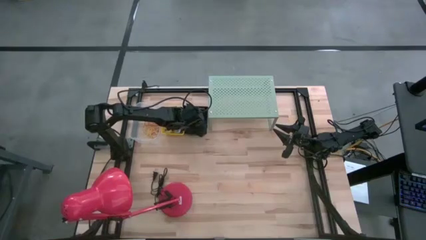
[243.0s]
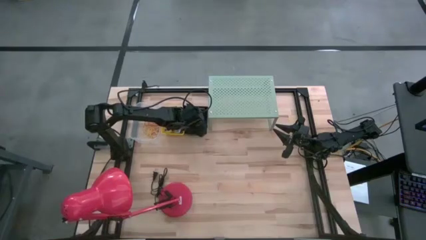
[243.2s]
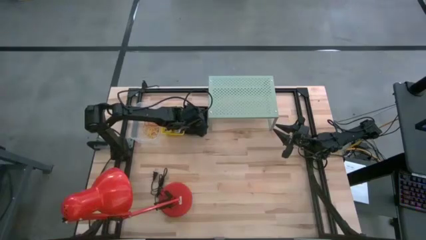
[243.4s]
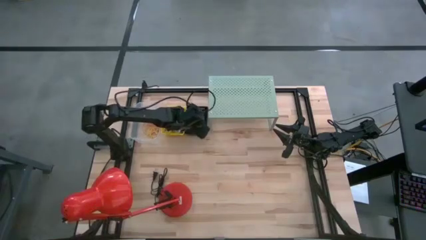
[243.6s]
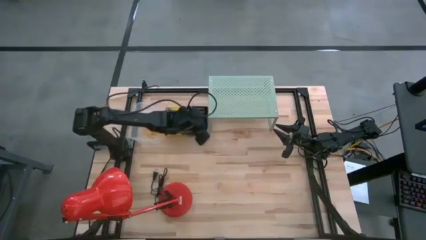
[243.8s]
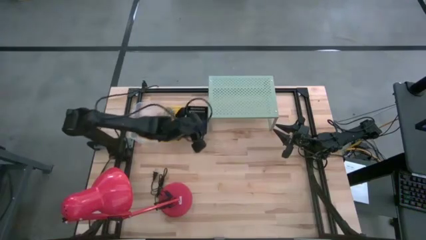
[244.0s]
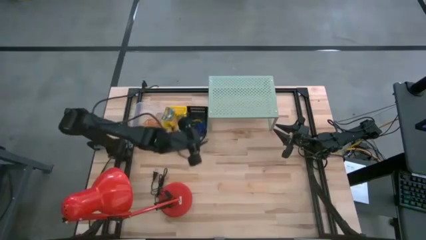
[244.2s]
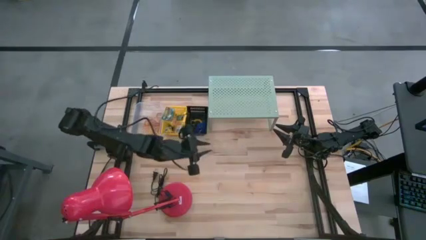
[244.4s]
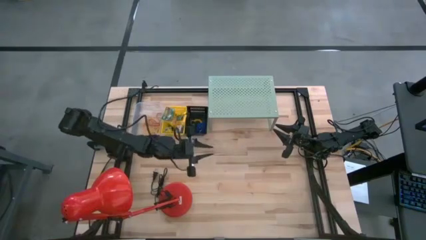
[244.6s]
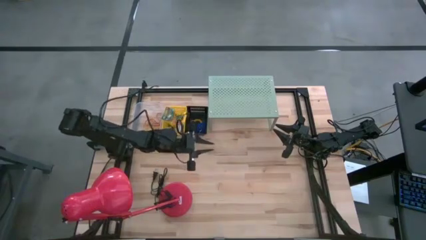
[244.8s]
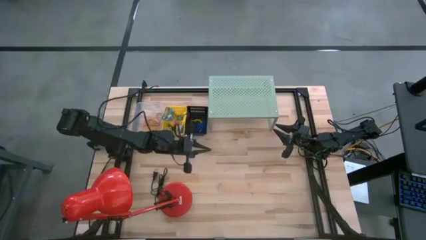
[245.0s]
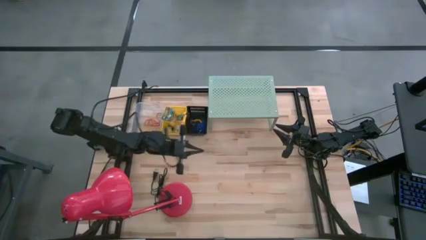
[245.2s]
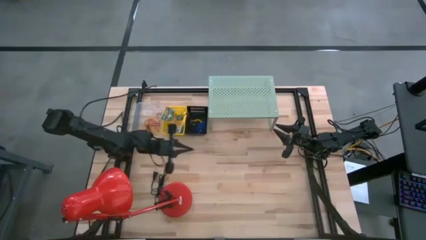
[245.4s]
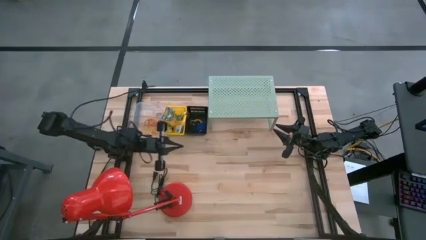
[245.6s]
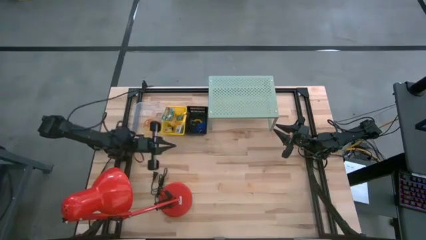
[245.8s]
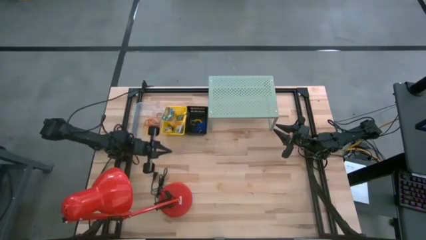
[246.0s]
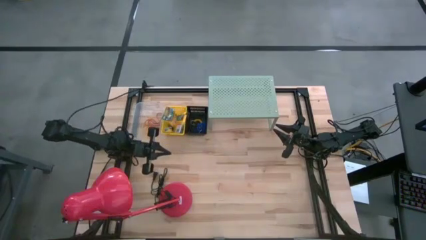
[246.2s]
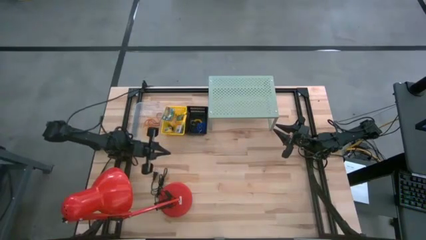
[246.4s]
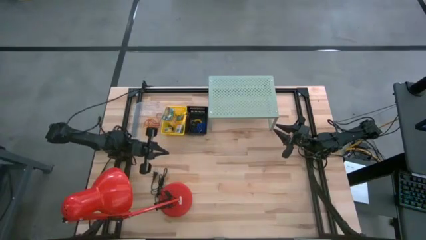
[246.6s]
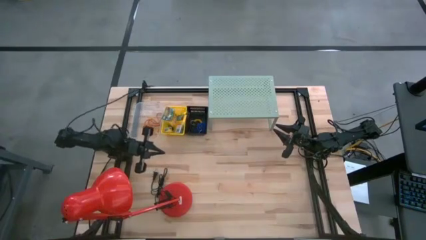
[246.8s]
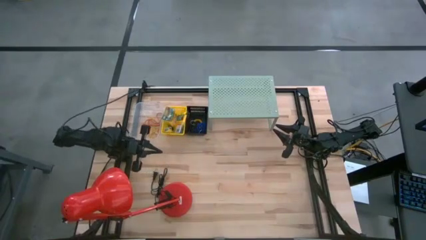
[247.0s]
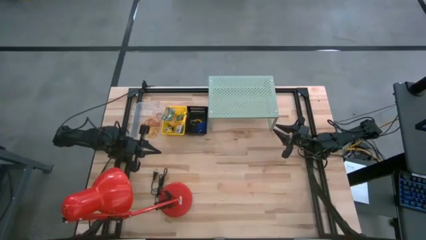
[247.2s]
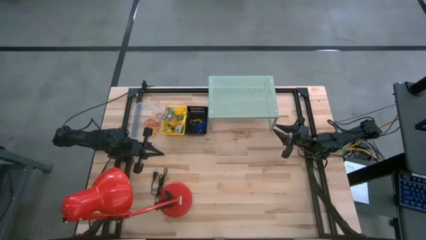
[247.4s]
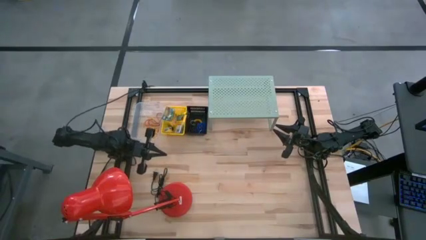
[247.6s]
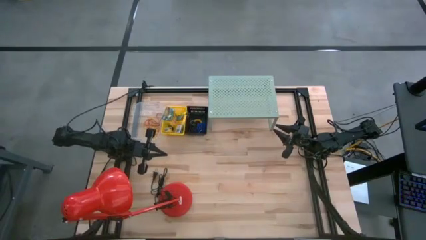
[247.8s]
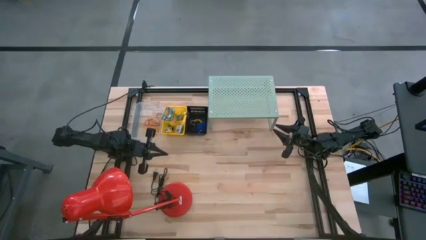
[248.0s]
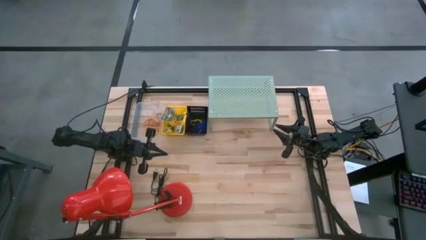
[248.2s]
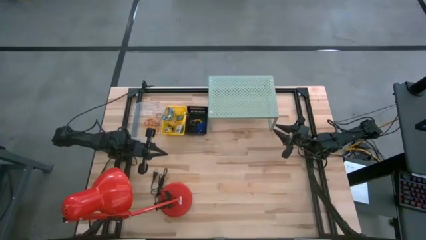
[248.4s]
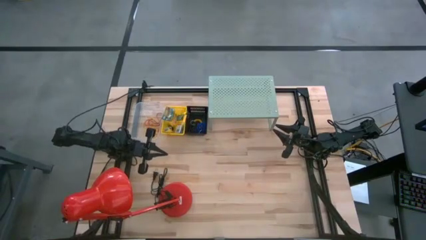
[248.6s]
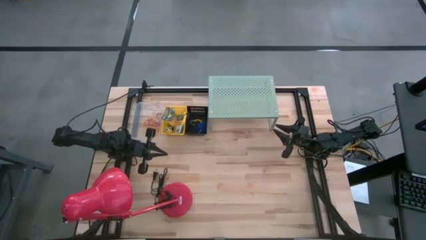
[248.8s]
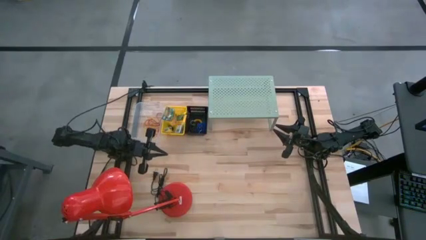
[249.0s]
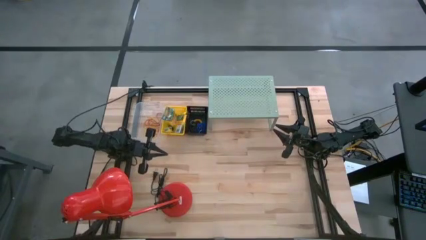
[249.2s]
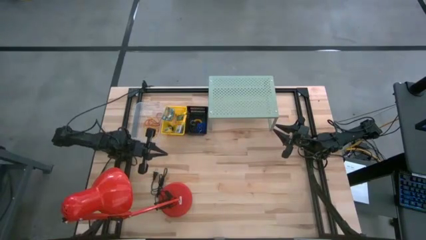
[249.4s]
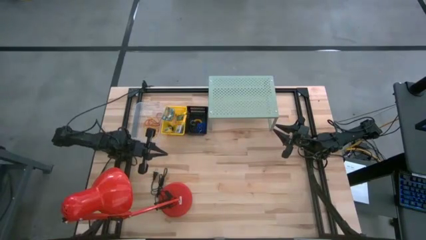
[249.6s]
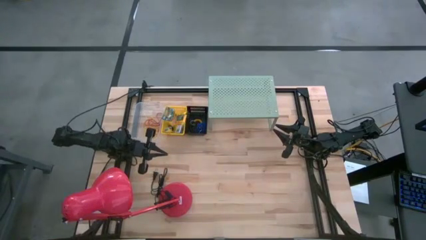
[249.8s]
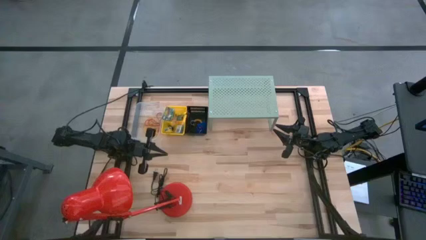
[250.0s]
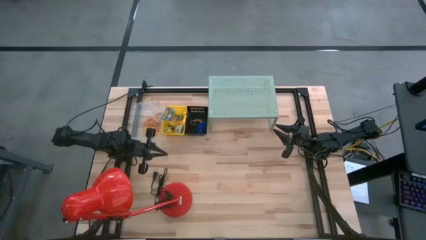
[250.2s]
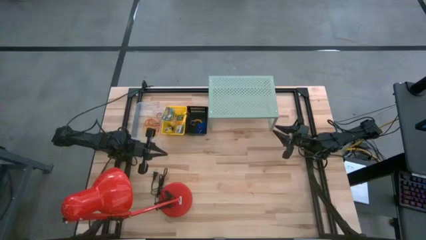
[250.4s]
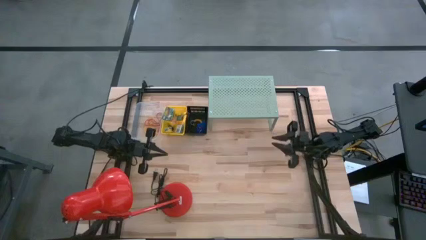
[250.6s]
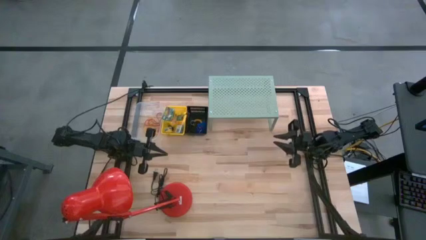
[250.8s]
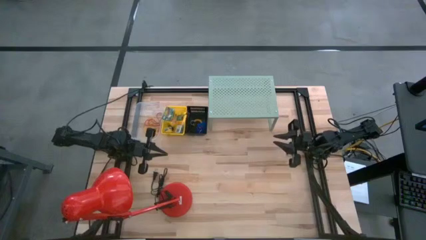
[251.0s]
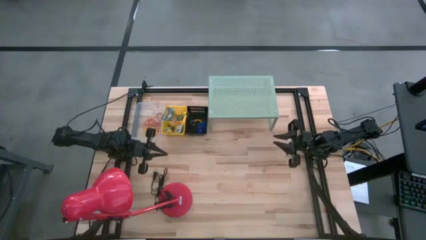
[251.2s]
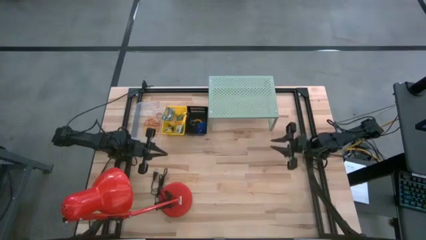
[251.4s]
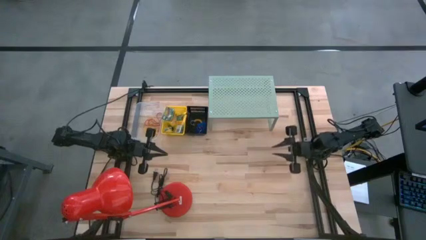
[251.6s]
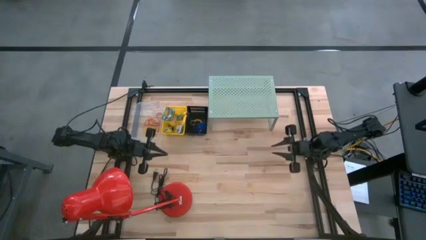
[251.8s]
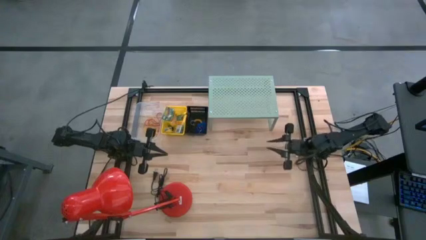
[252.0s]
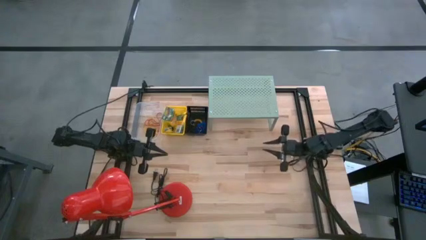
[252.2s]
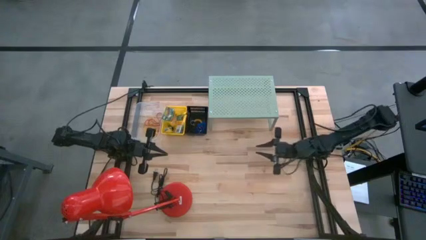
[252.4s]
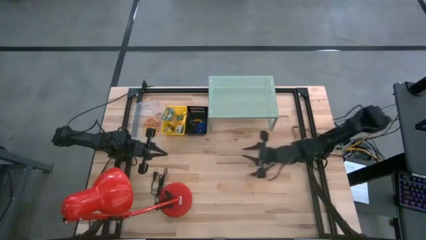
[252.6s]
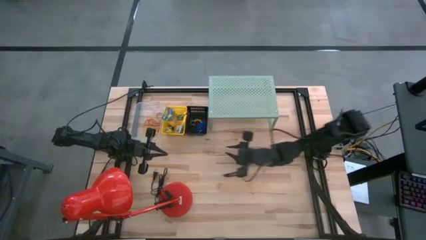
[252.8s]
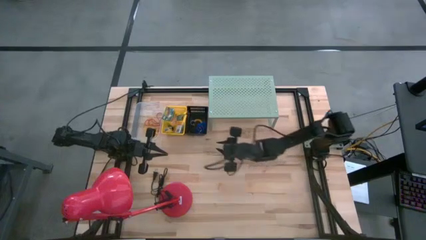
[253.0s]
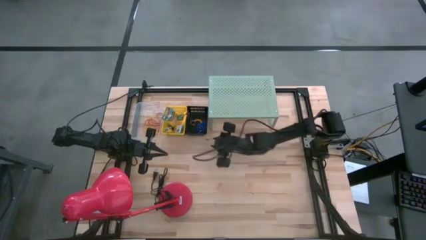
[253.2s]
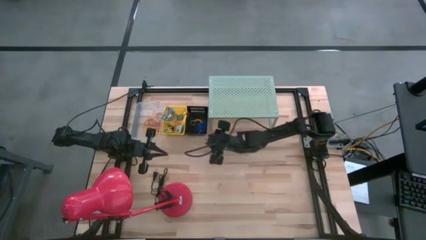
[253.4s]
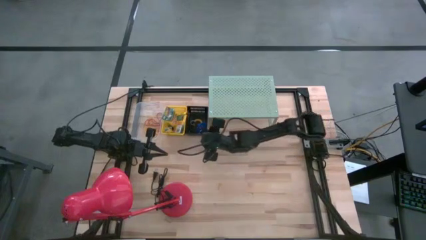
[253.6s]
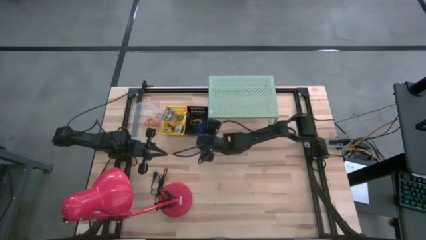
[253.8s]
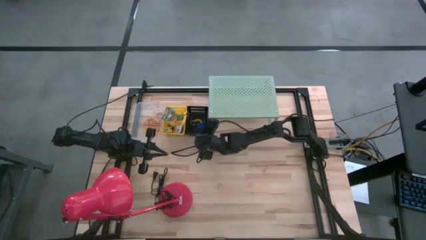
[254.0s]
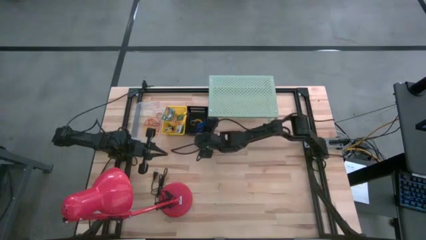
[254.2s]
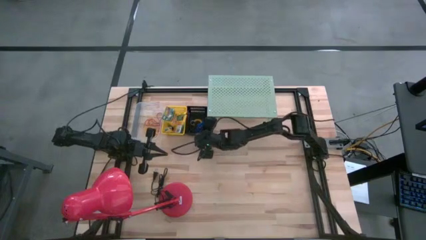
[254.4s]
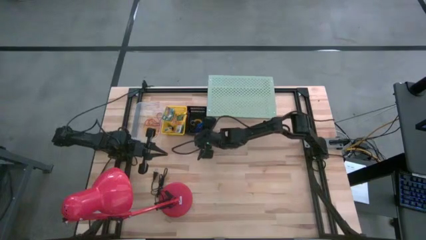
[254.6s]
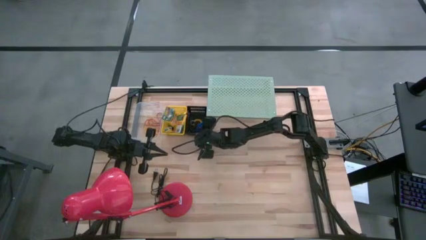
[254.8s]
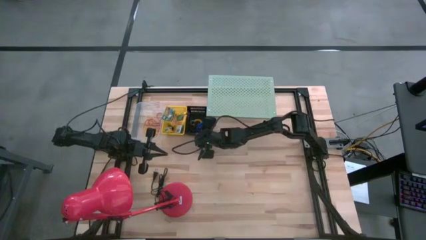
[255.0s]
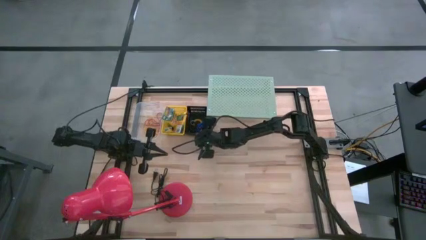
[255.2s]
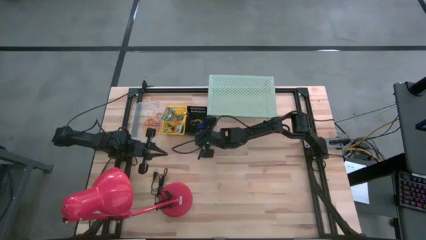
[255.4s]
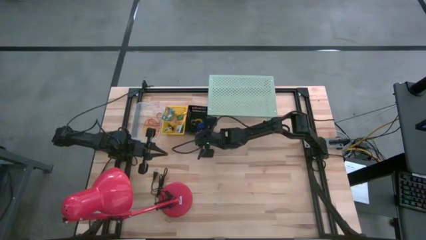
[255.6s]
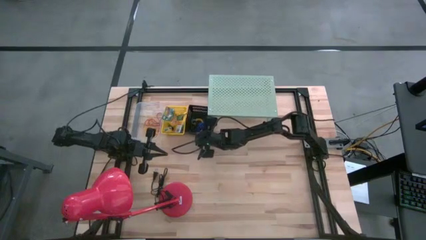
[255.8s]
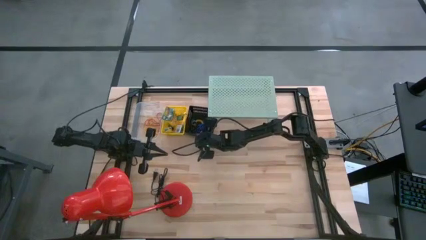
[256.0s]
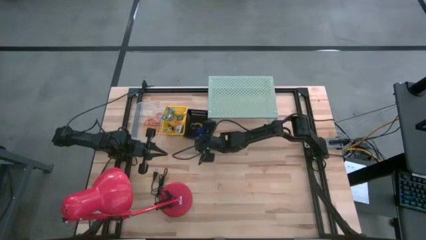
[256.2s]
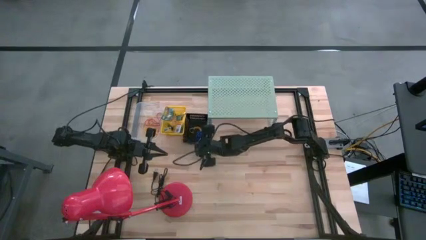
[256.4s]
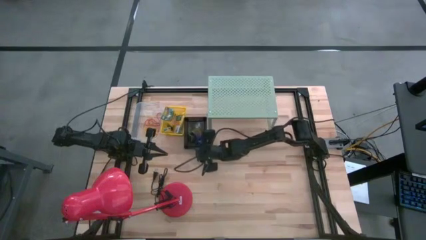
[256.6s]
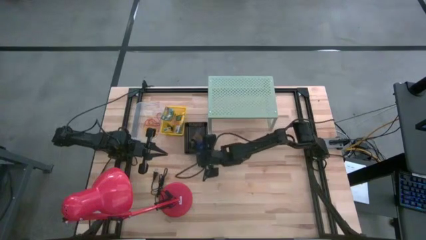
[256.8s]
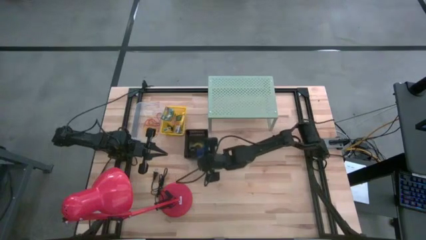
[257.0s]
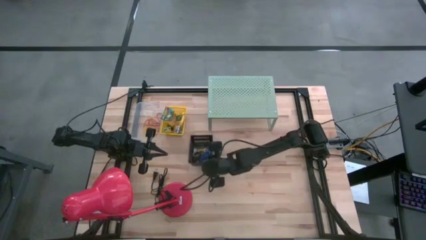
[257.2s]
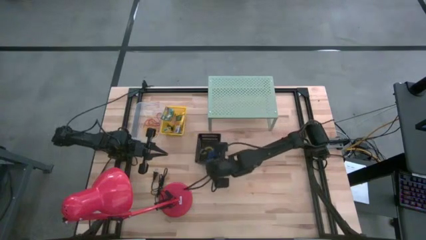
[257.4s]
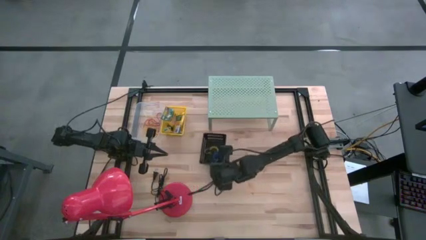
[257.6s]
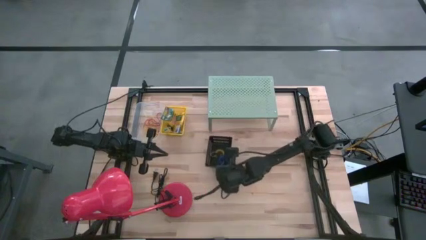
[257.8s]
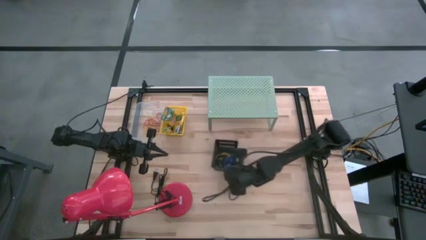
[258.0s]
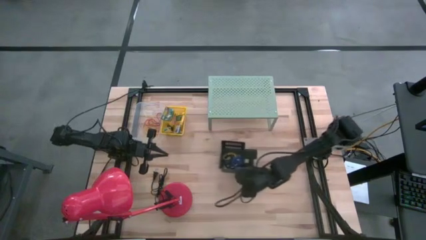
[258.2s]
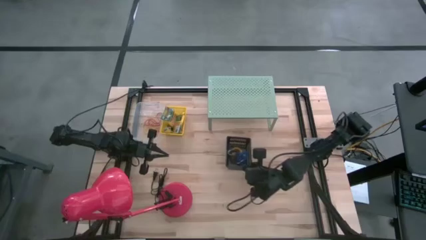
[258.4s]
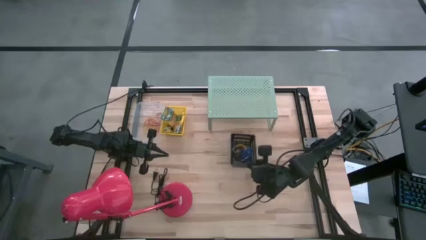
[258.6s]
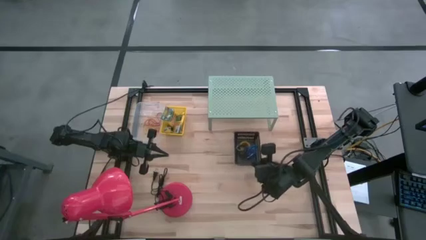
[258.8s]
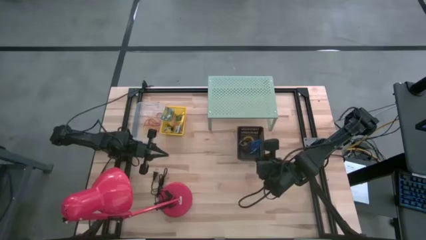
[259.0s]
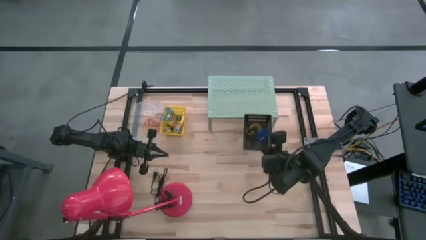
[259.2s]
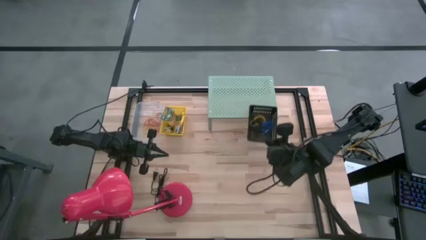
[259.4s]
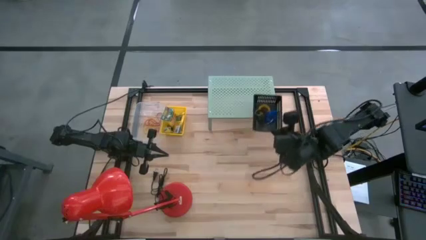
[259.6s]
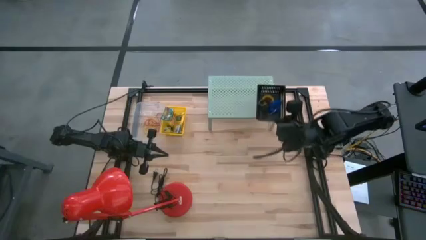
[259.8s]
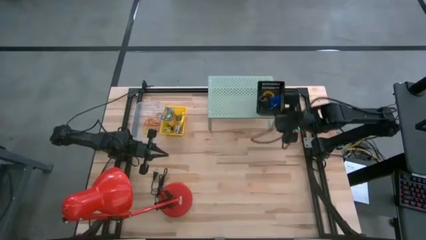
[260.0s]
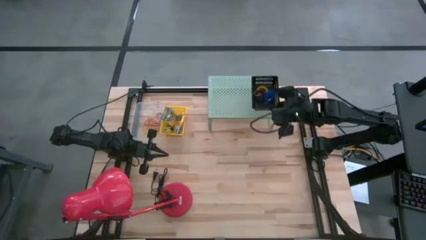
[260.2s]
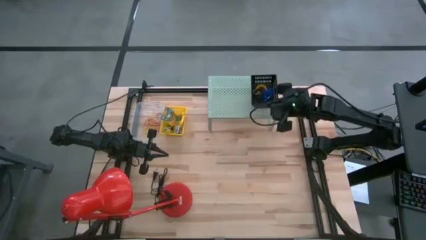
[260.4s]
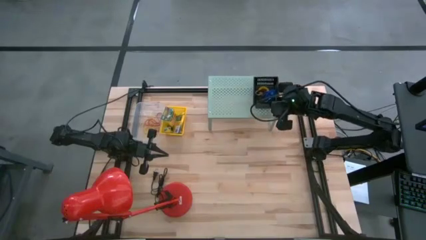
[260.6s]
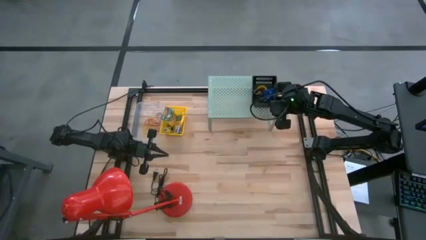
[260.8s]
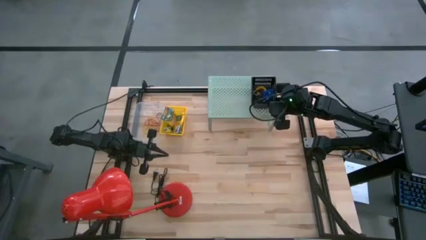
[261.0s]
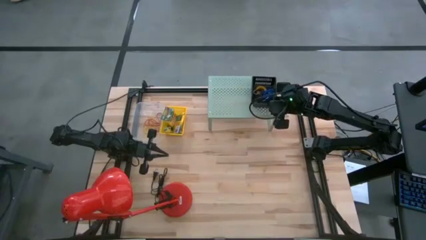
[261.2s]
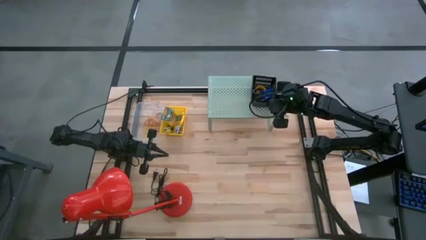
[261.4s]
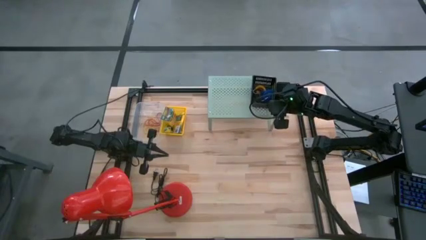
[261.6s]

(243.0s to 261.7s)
Task: Pick & Place Office Desk Supplies
Put the black bin with the spring rubberbands on the shelf
